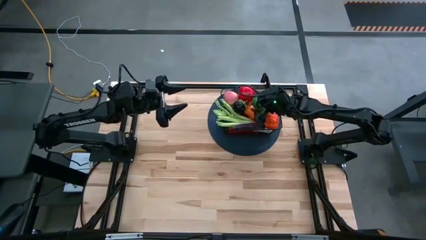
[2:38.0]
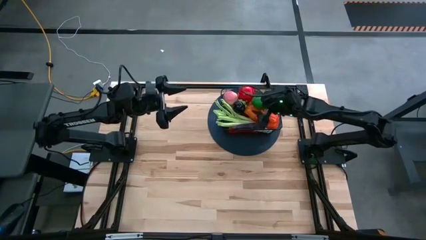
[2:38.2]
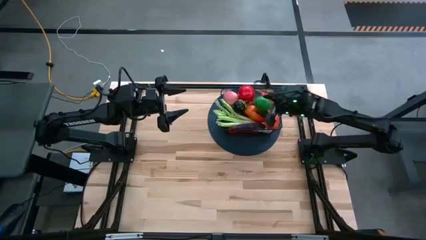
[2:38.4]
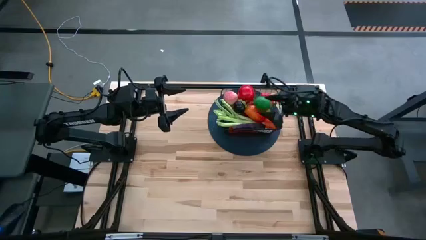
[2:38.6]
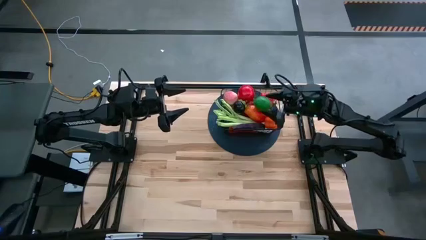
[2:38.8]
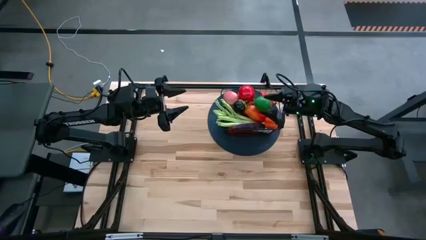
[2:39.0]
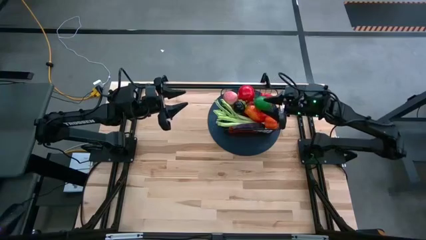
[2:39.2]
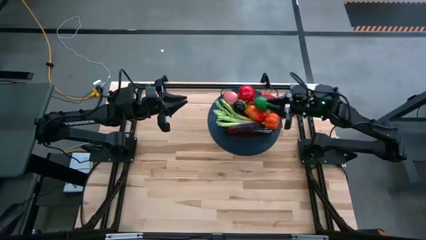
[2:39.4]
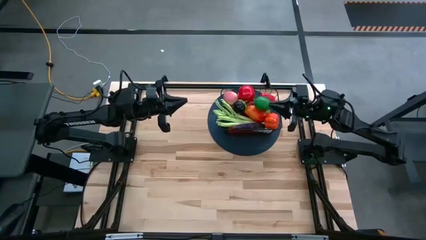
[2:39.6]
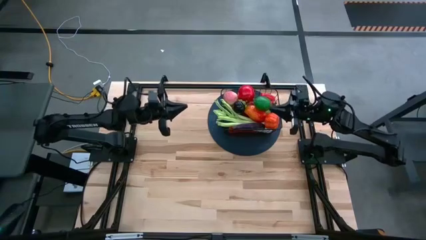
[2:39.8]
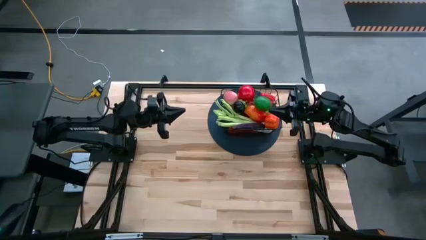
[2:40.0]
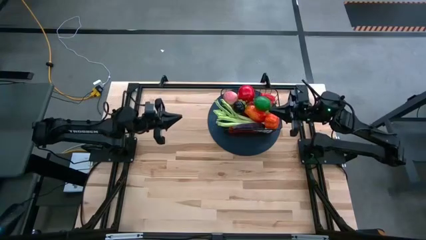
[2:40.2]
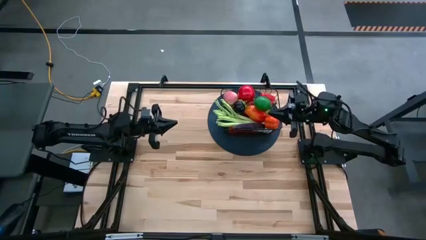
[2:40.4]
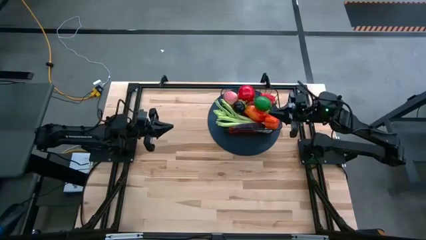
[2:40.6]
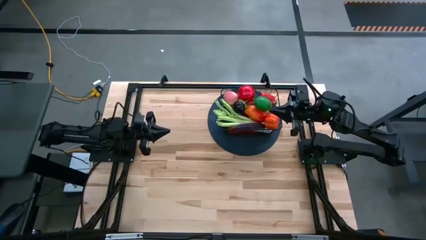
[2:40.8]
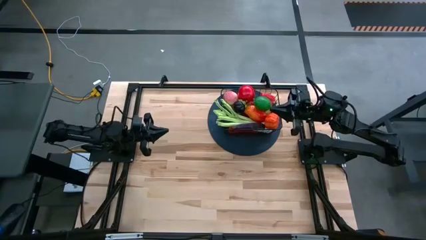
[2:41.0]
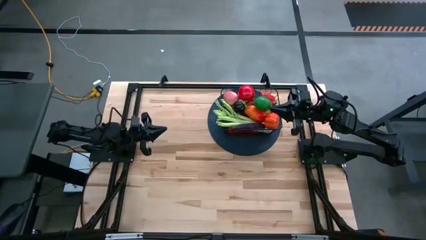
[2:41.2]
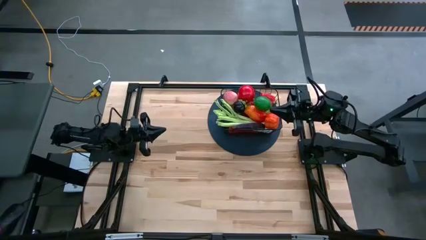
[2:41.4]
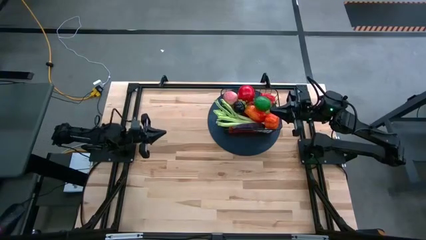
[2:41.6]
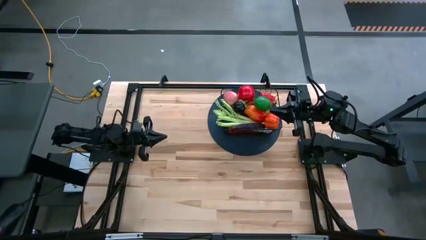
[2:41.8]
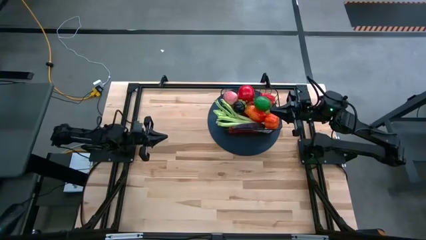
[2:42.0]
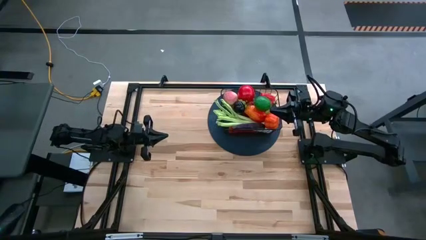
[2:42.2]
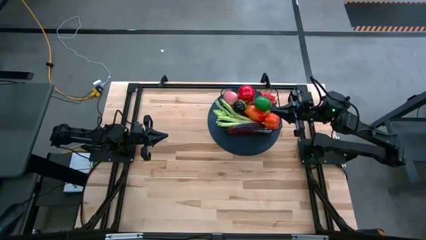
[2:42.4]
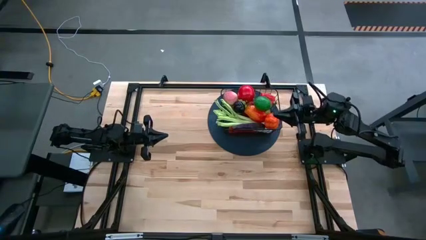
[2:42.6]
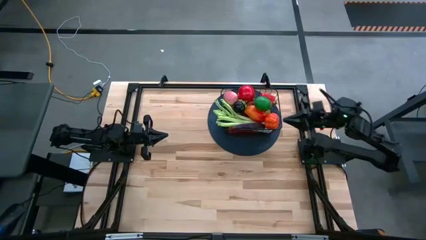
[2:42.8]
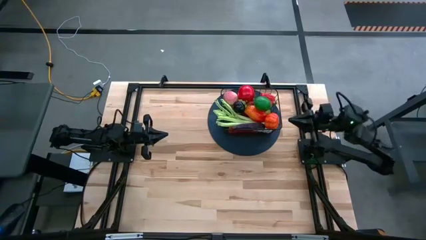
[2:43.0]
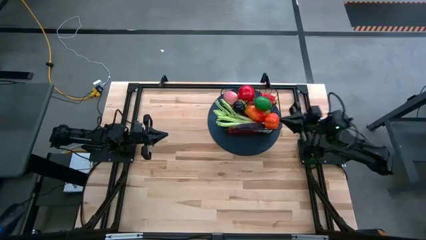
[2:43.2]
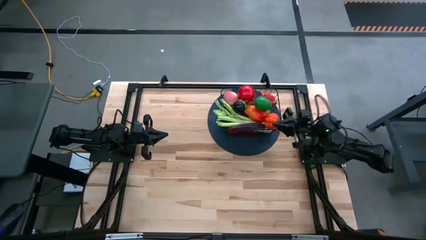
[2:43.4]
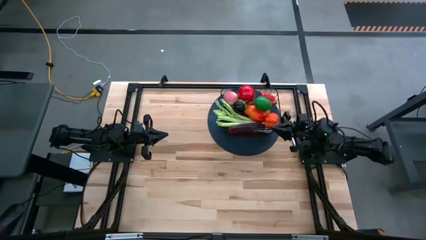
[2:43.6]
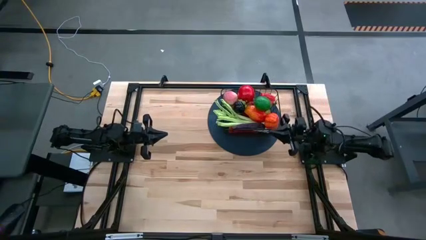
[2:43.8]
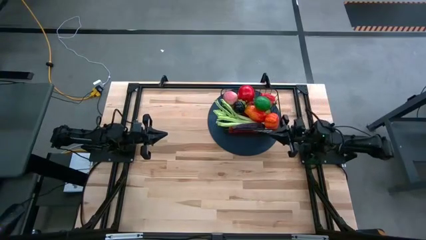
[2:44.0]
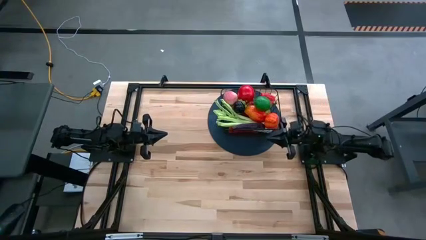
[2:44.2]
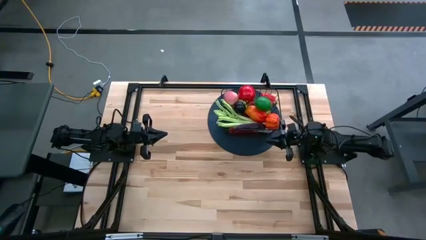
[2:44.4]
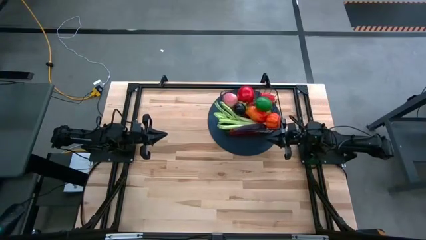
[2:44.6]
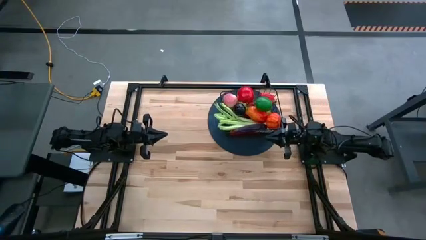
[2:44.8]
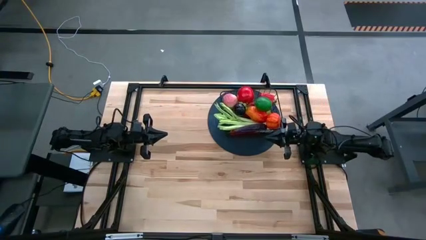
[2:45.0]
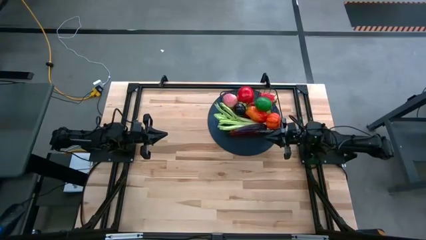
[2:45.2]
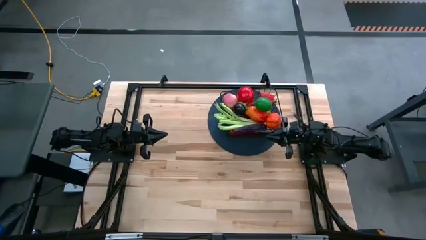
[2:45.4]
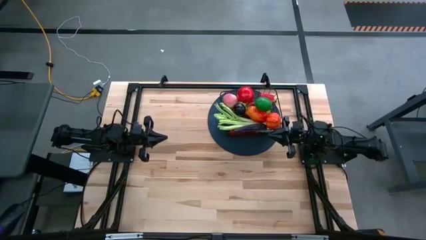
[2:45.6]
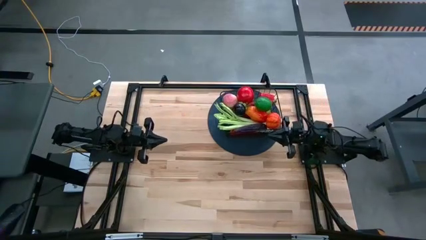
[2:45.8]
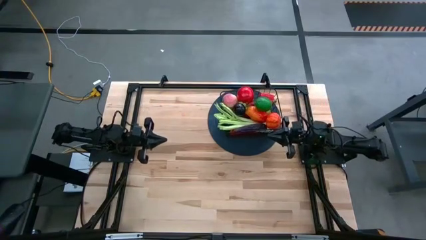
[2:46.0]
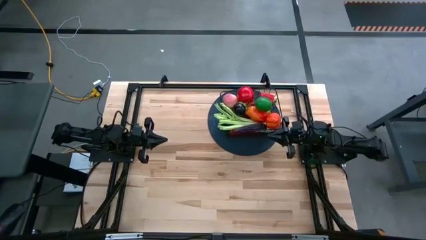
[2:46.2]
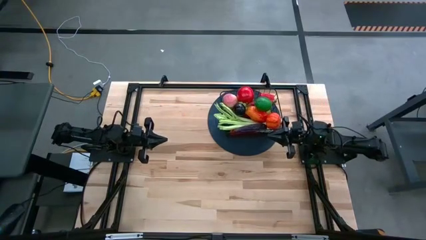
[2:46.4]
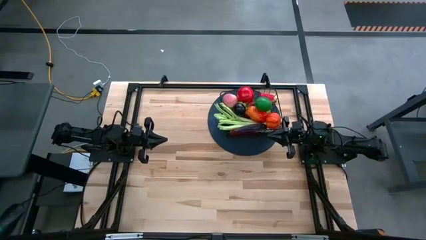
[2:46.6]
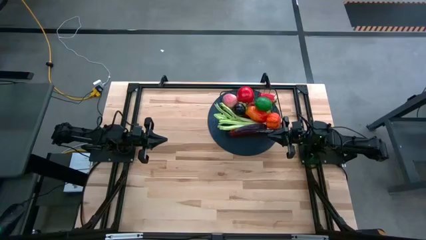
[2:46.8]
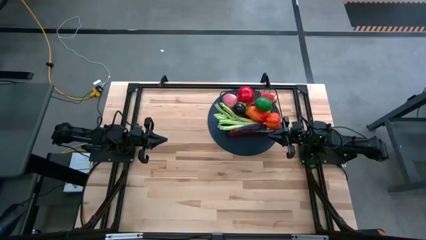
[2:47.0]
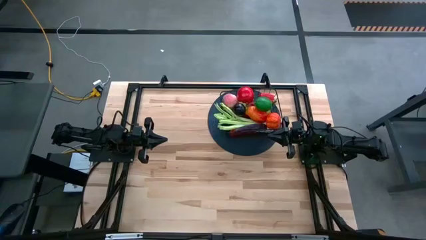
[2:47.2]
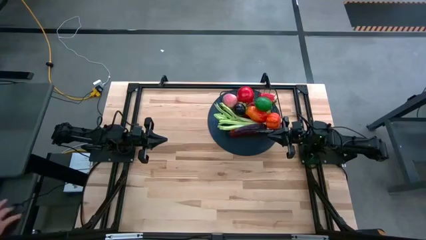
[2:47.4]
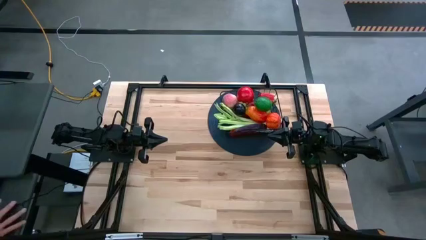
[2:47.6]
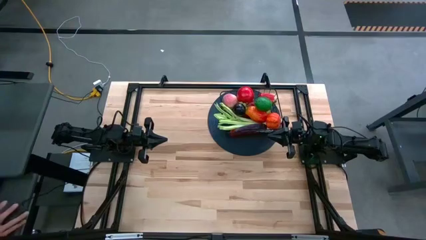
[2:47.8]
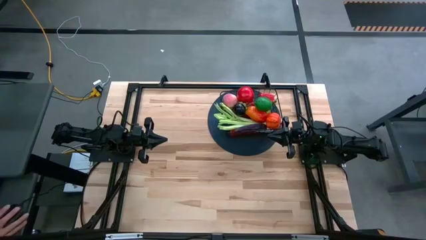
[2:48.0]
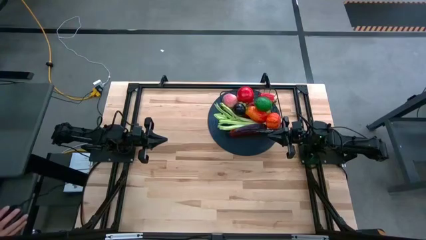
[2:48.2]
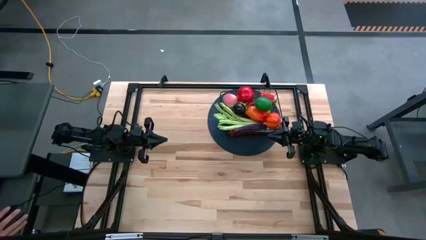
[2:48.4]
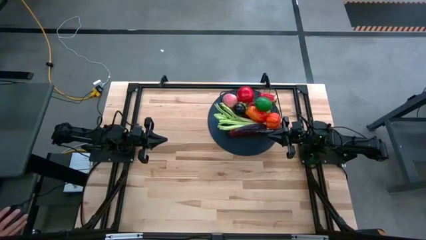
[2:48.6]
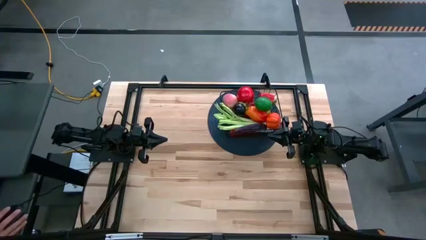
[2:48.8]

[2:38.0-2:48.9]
Task: Build produce basket
Return to Home Position

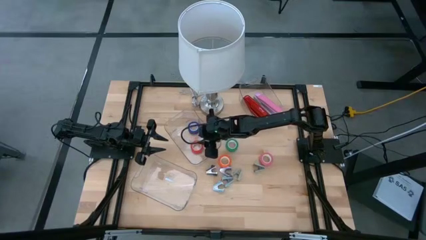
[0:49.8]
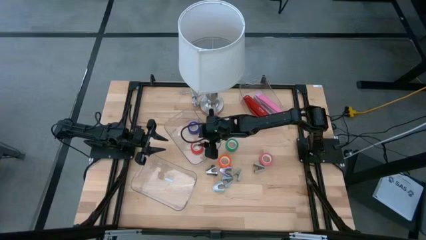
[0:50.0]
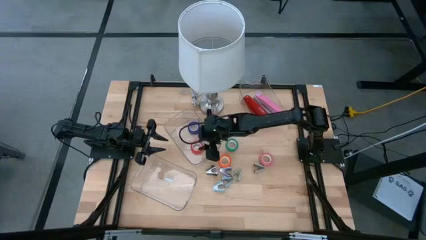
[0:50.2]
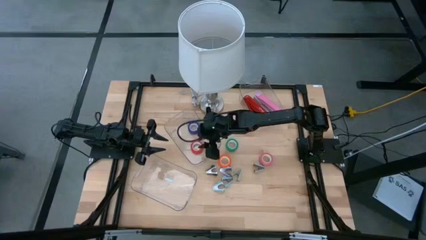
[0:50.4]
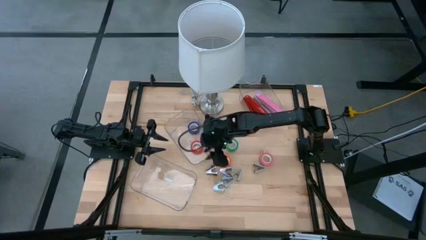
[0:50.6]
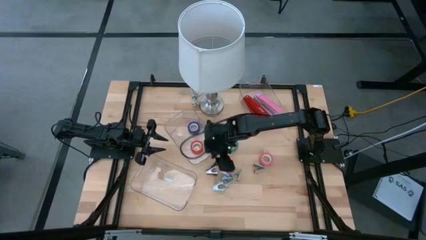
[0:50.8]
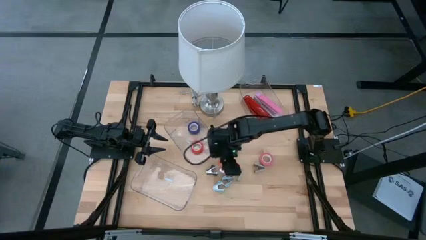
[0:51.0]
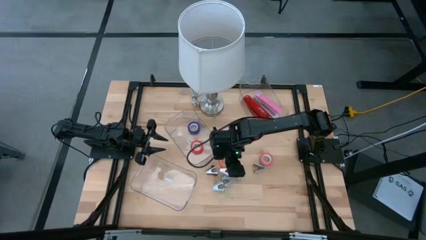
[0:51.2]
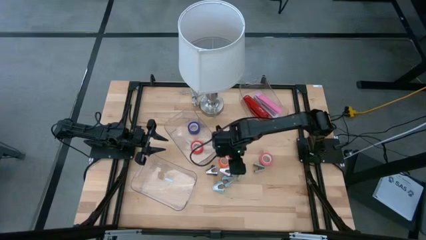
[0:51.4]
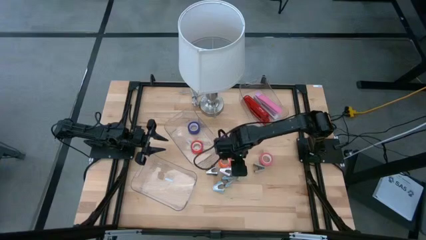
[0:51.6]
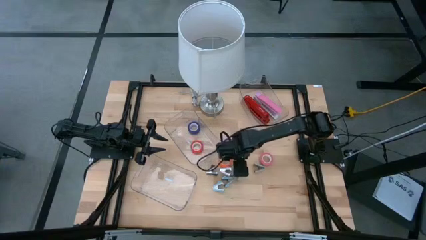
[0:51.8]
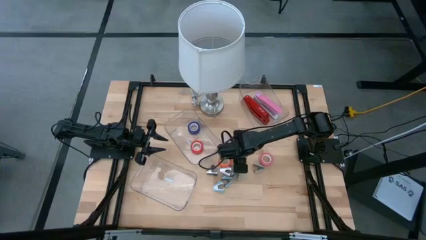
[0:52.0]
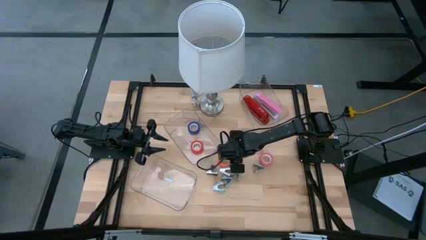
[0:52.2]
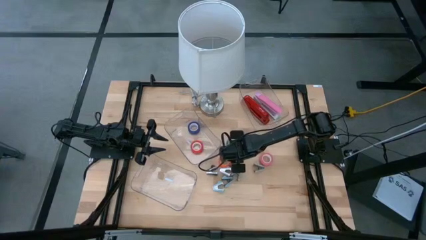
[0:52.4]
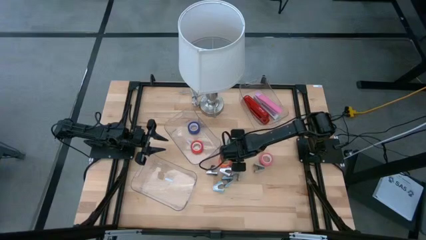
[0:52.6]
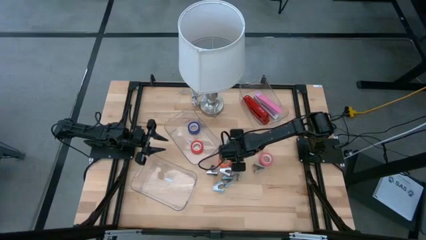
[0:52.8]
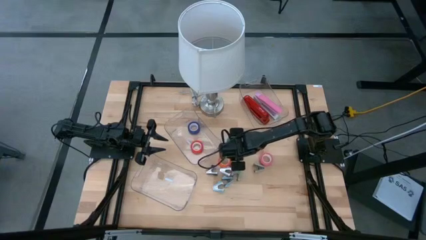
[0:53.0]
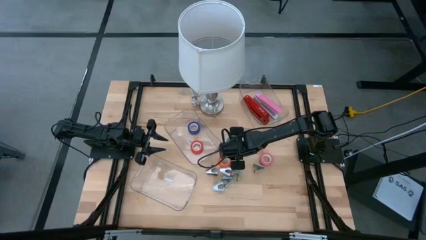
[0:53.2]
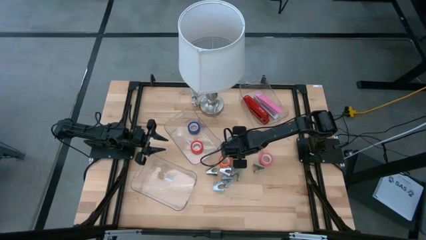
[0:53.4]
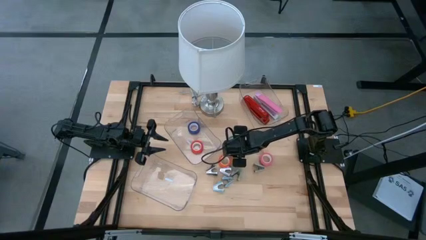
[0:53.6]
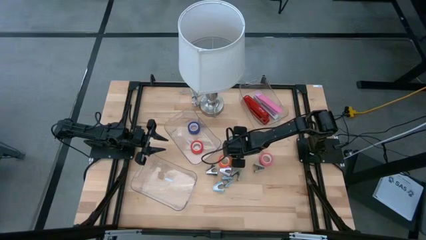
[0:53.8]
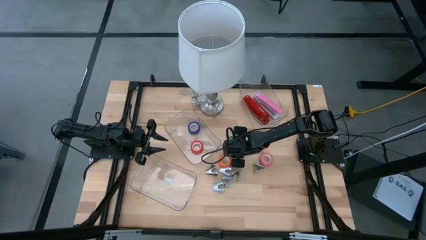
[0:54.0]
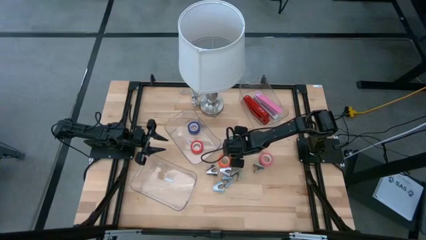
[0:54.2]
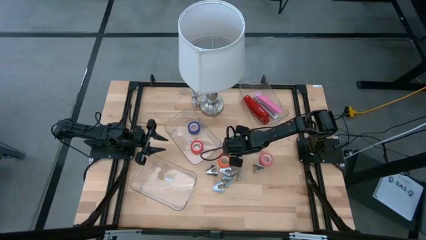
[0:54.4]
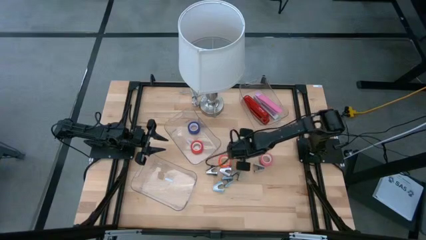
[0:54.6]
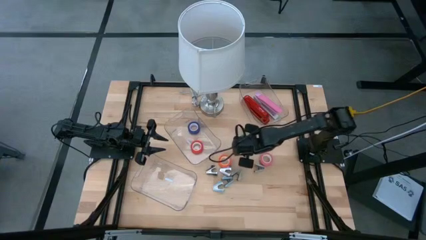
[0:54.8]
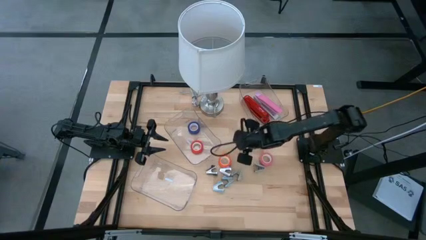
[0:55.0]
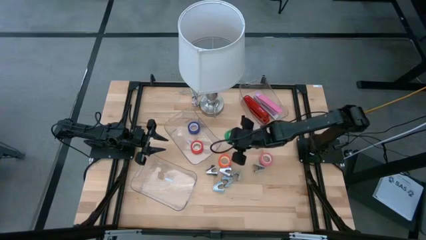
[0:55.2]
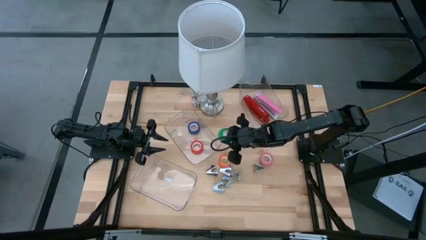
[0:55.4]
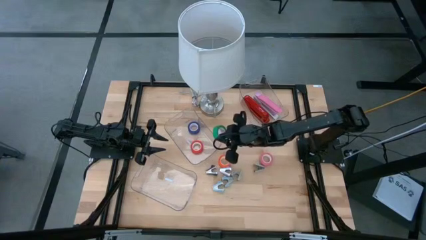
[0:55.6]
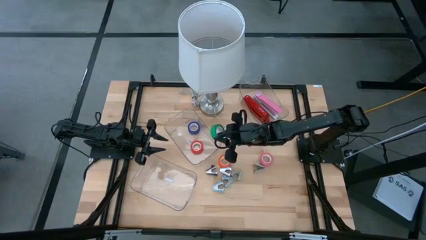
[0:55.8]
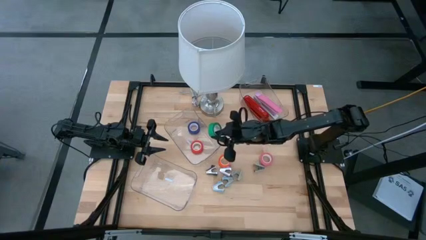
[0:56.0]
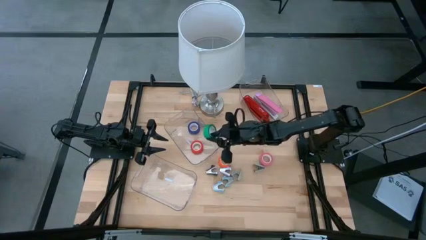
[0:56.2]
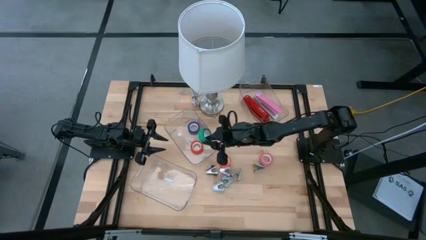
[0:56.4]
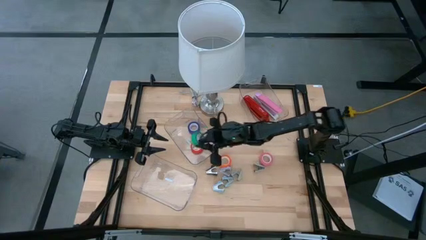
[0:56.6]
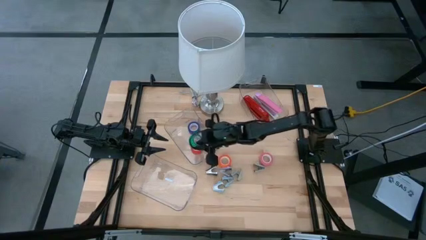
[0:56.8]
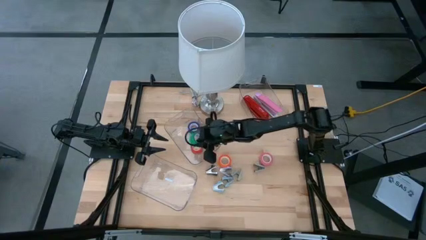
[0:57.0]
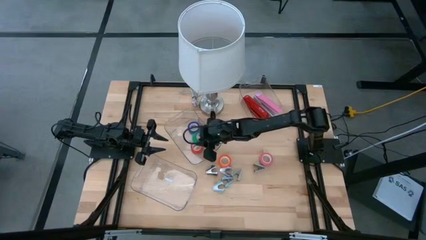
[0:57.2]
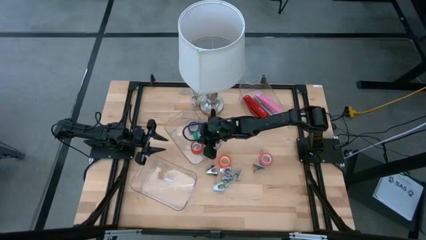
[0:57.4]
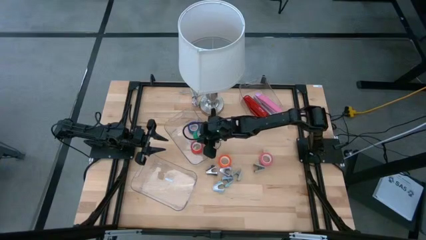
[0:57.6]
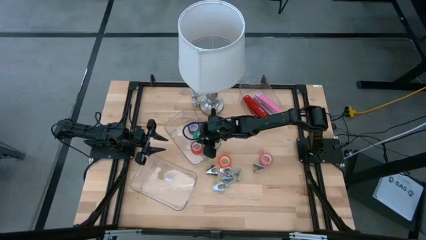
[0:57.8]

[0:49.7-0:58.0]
Task: Pick and place Stapler, Stapler remover, tape
Put the green tape into the middle transparent bin
